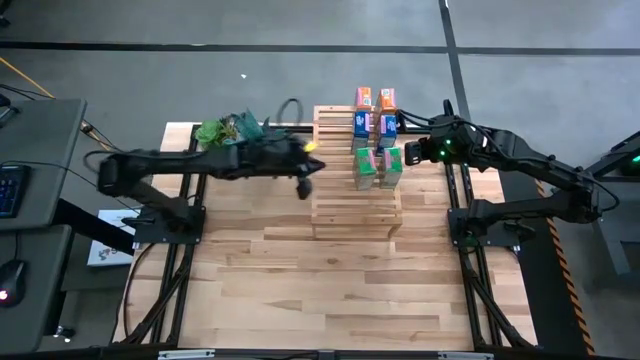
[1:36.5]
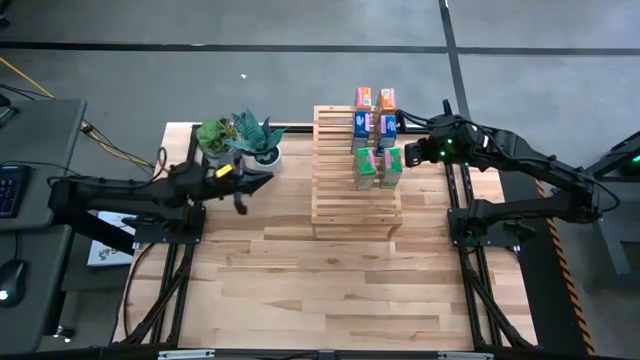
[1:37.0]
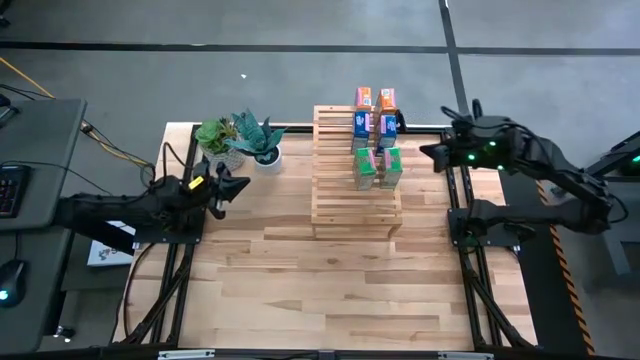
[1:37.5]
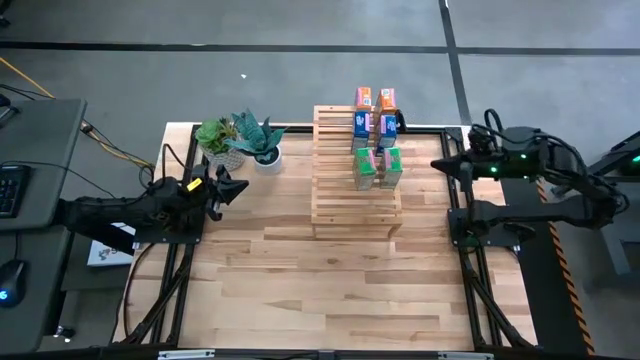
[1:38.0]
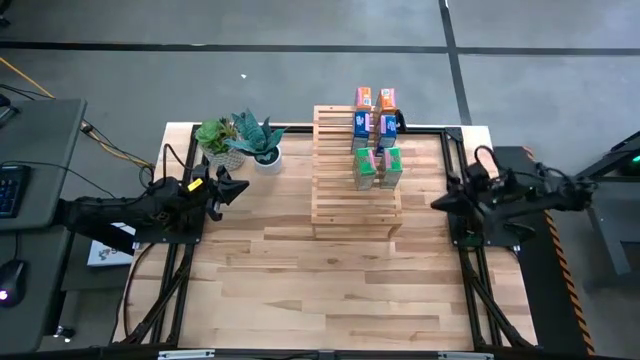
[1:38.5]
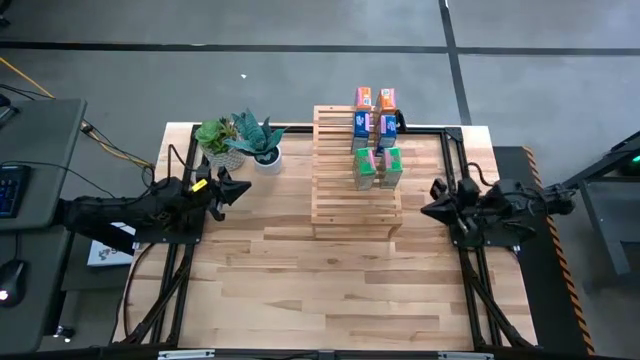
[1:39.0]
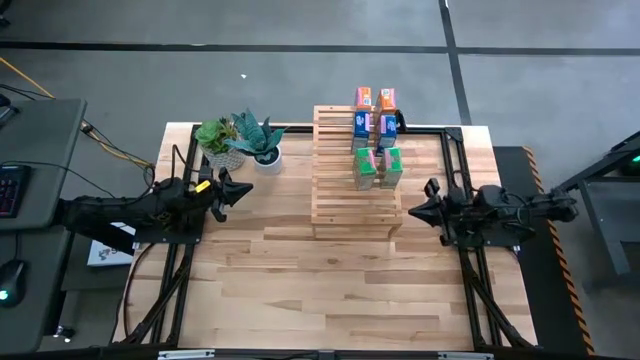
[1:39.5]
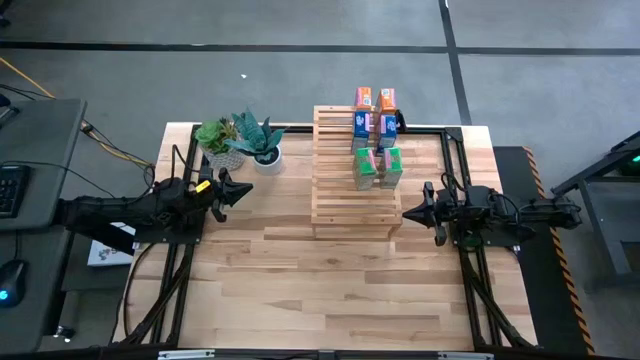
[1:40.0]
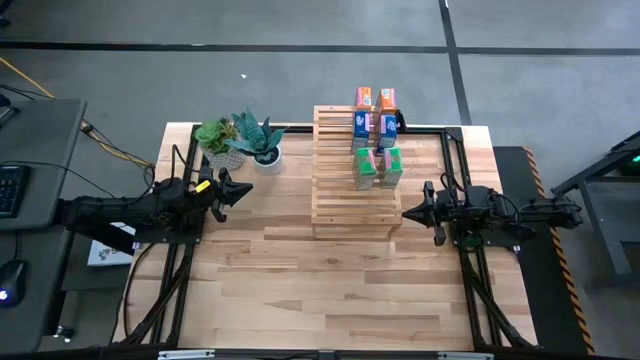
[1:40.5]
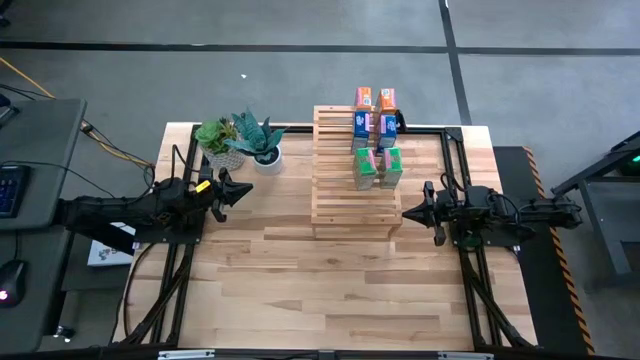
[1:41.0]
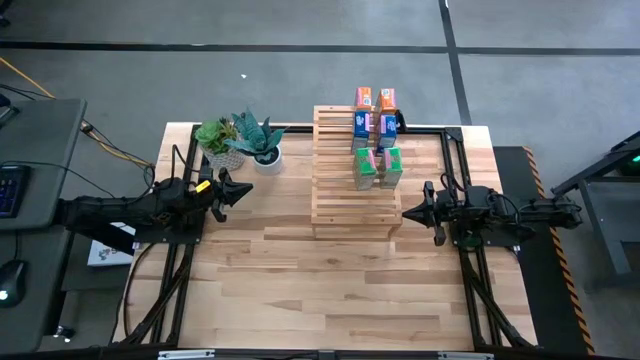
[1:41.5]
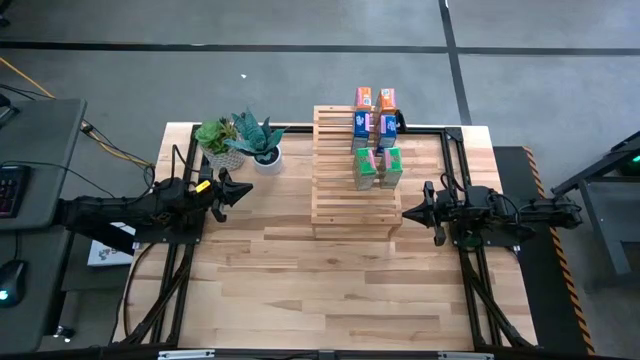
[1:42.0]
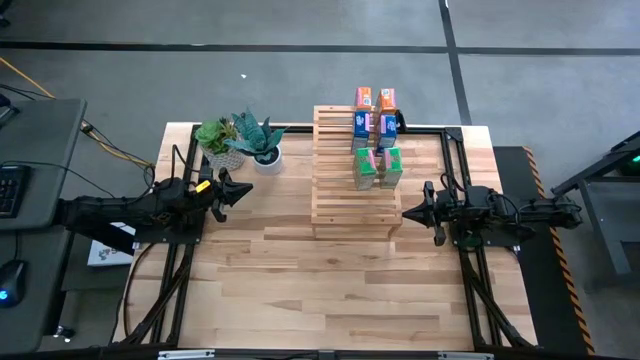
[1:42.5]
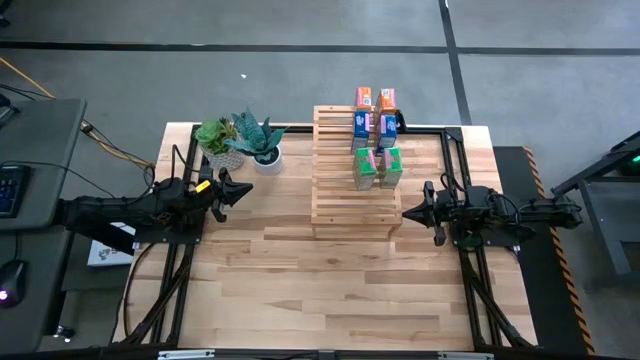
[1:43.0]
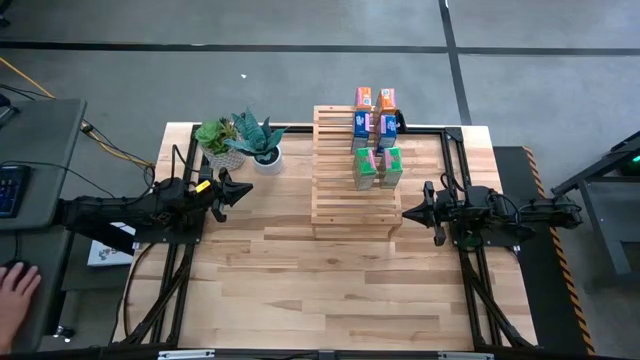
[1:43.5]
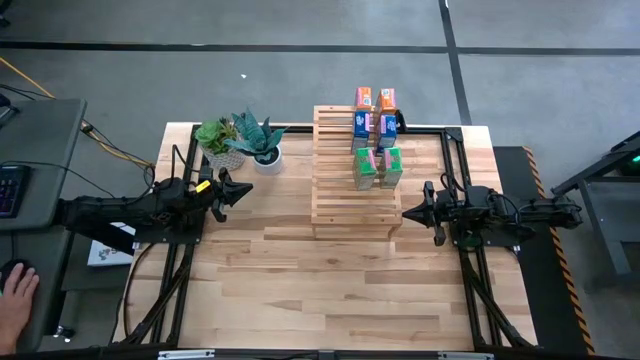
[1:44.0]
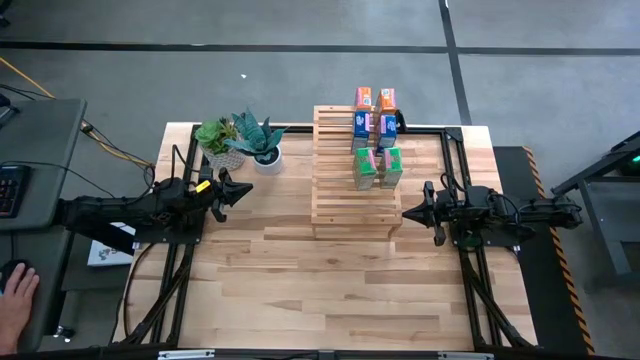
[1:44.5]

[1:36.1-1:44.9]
Task: Stack cereal on shelf
Return to Home Position

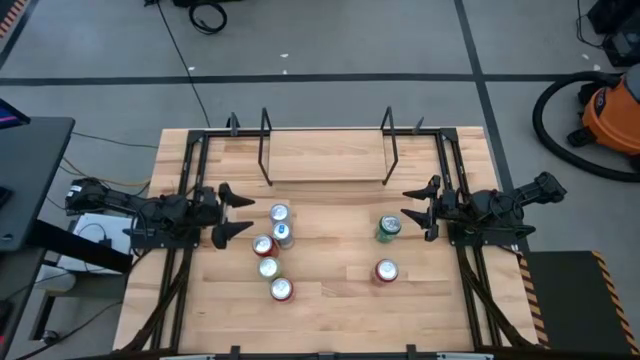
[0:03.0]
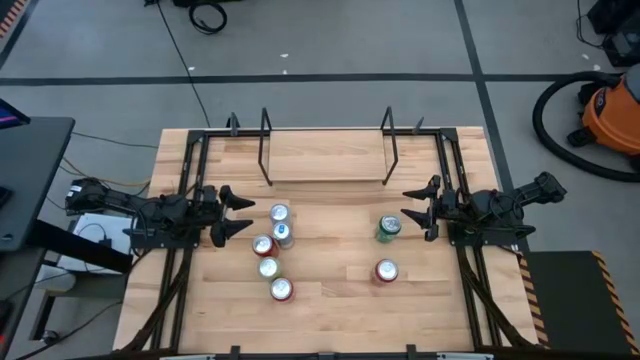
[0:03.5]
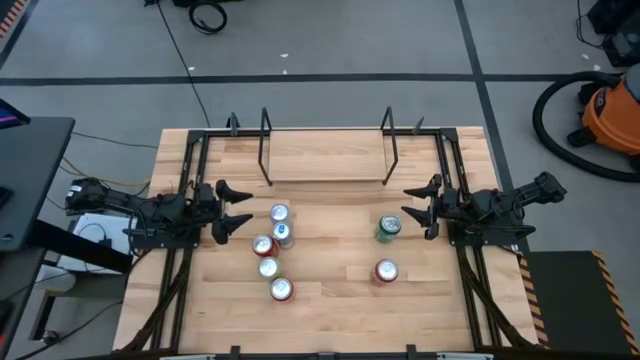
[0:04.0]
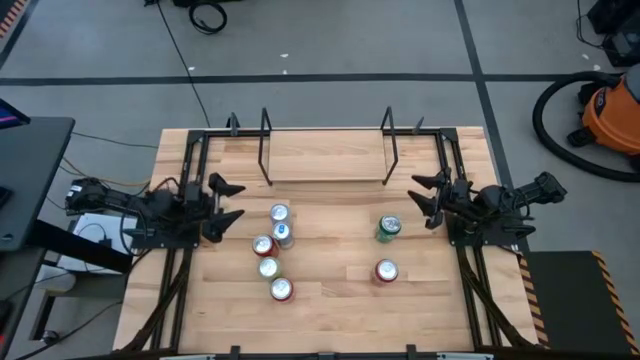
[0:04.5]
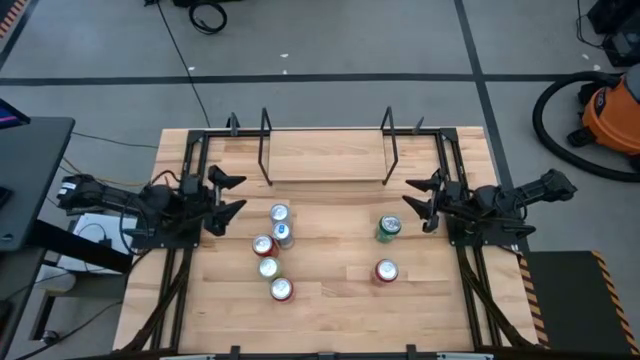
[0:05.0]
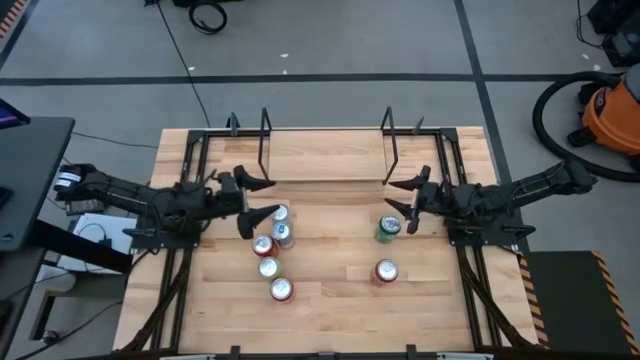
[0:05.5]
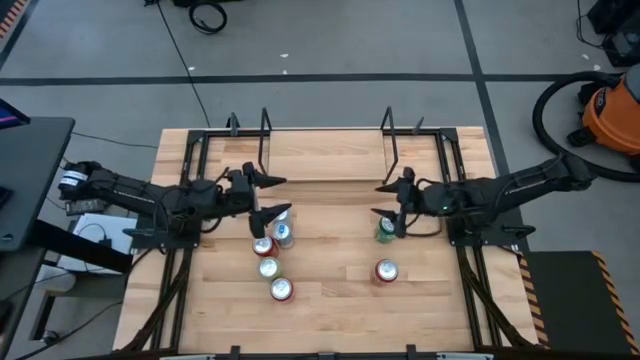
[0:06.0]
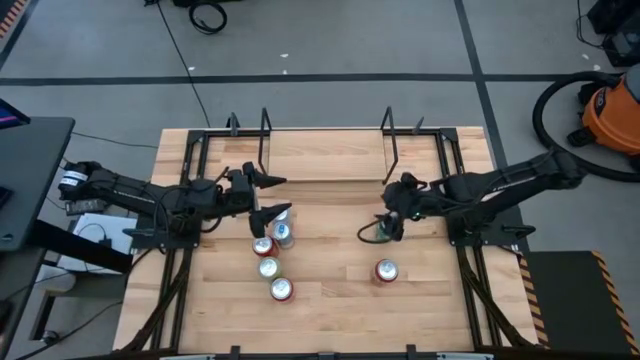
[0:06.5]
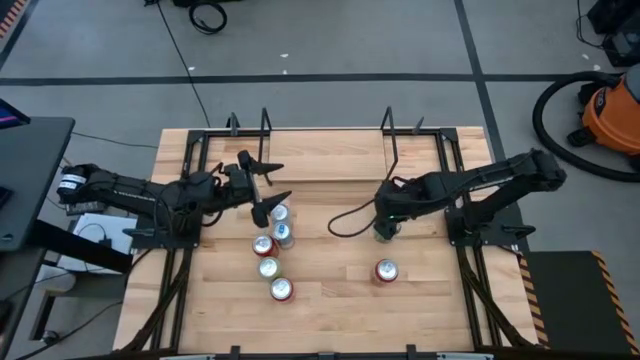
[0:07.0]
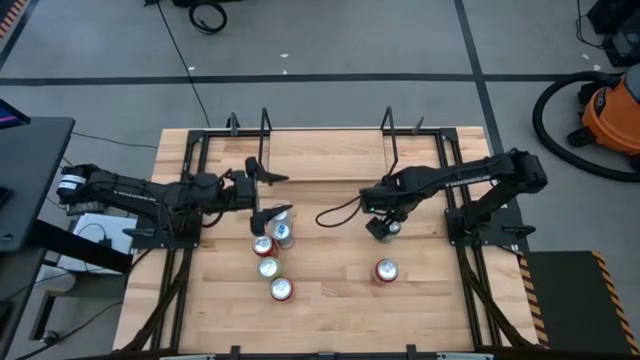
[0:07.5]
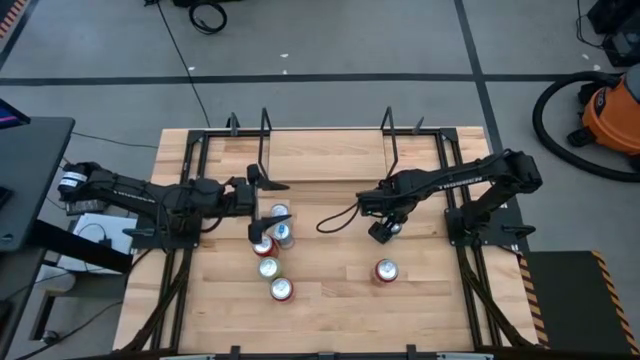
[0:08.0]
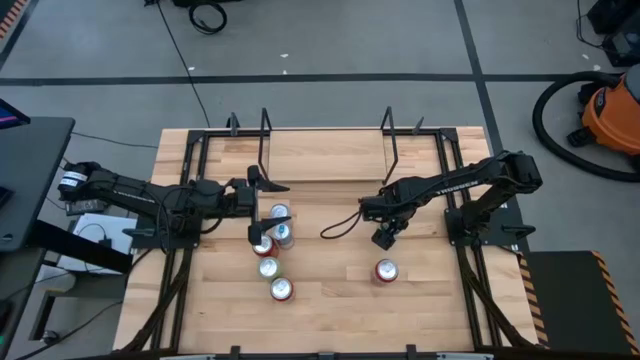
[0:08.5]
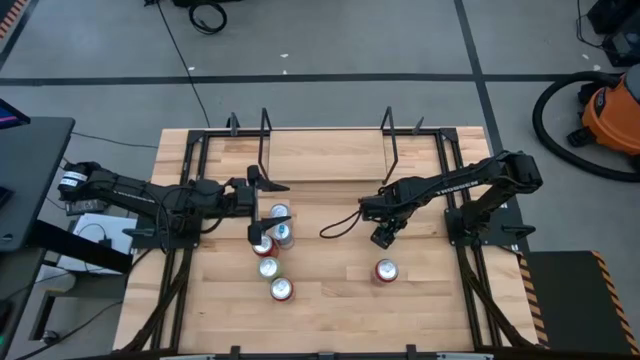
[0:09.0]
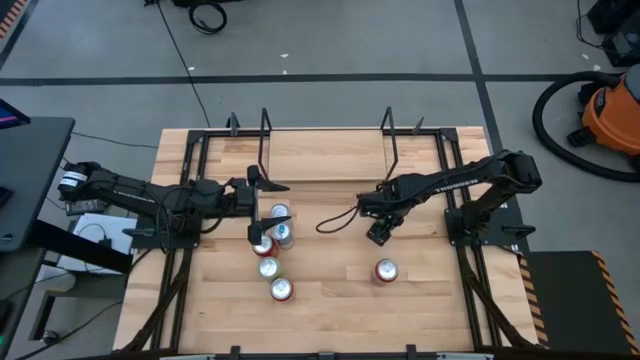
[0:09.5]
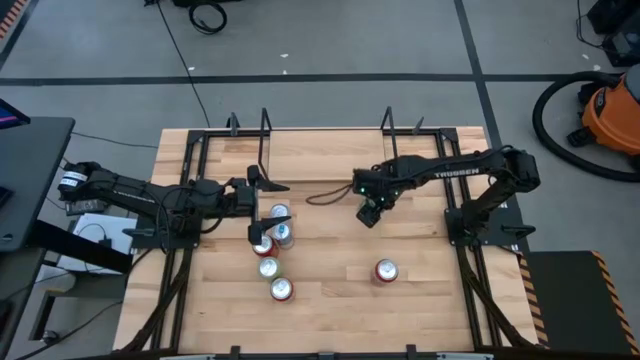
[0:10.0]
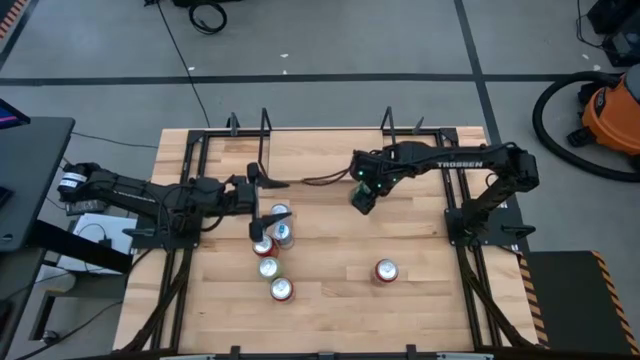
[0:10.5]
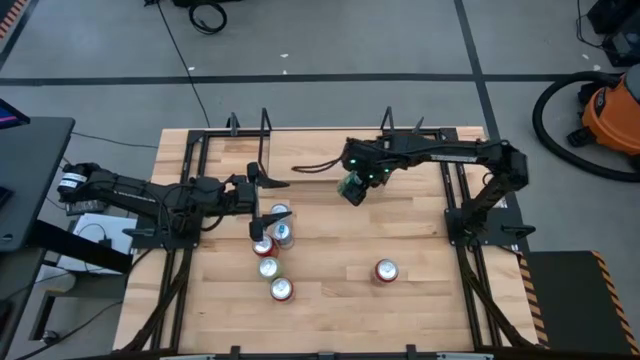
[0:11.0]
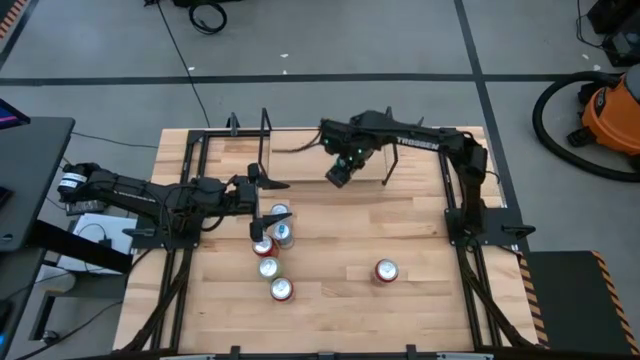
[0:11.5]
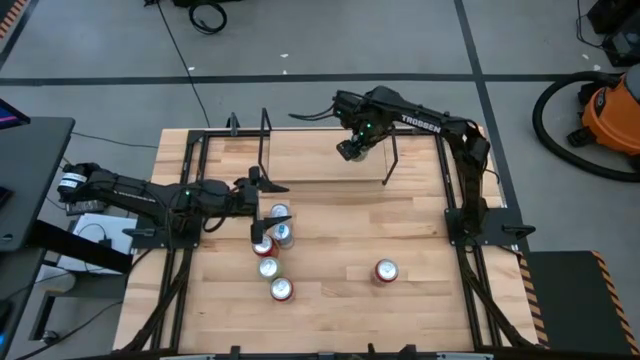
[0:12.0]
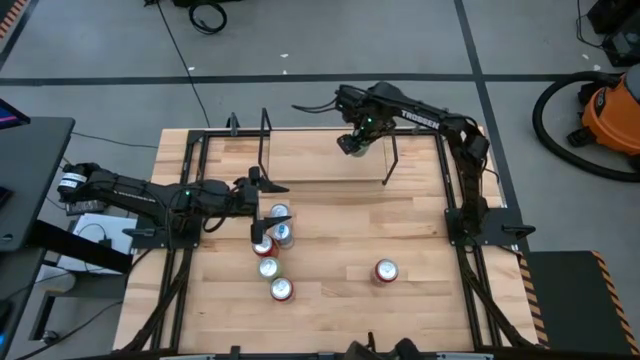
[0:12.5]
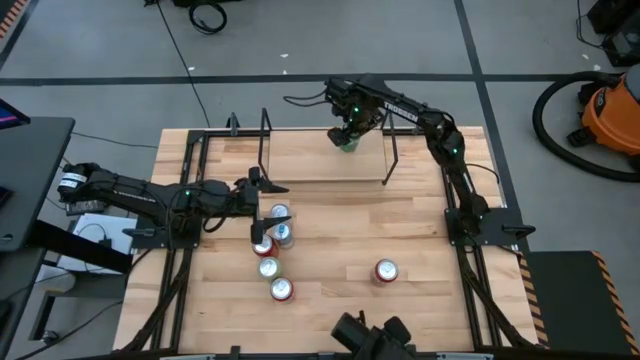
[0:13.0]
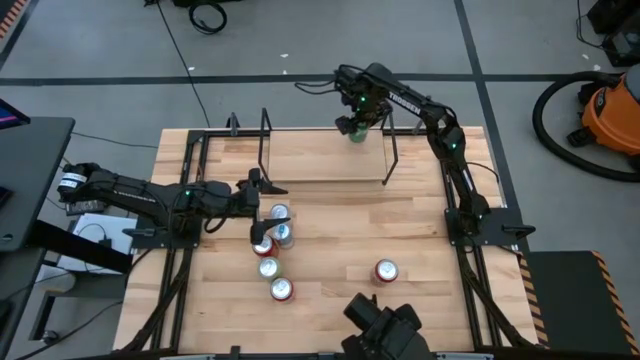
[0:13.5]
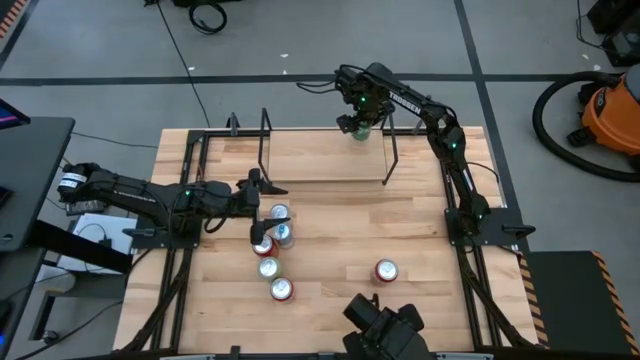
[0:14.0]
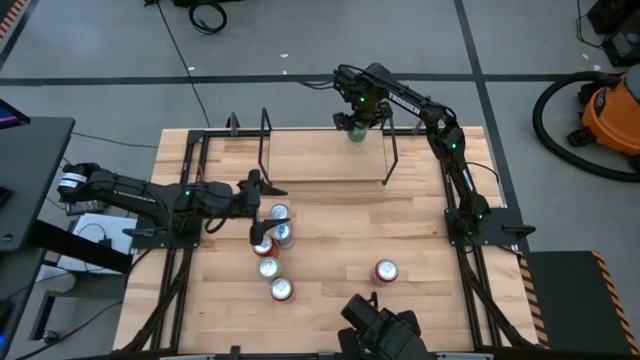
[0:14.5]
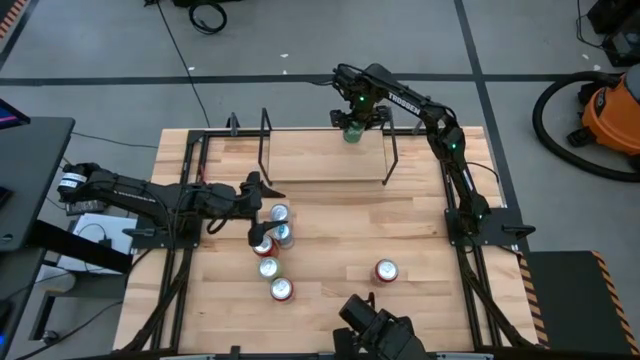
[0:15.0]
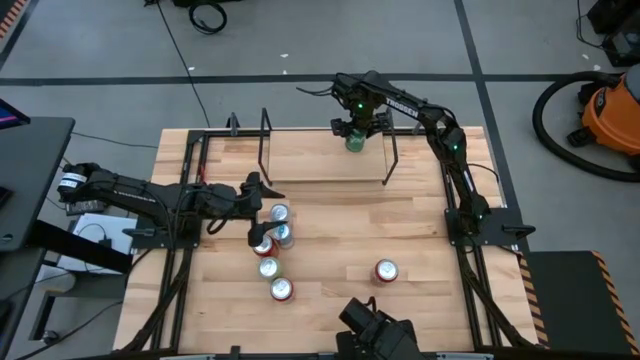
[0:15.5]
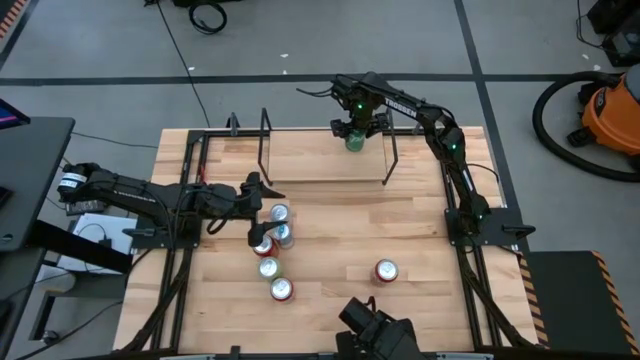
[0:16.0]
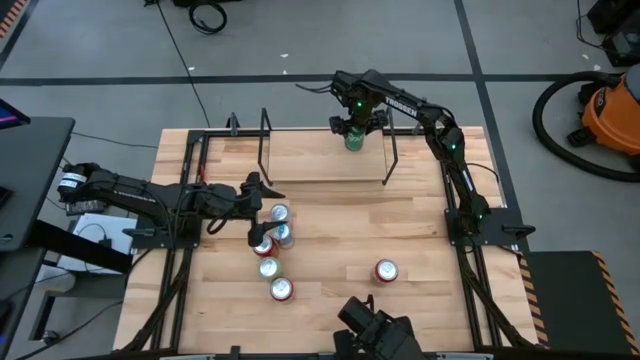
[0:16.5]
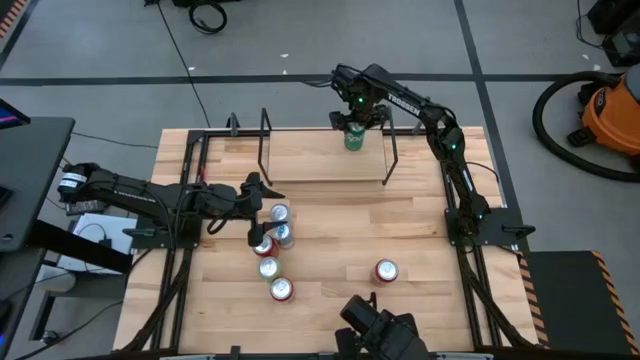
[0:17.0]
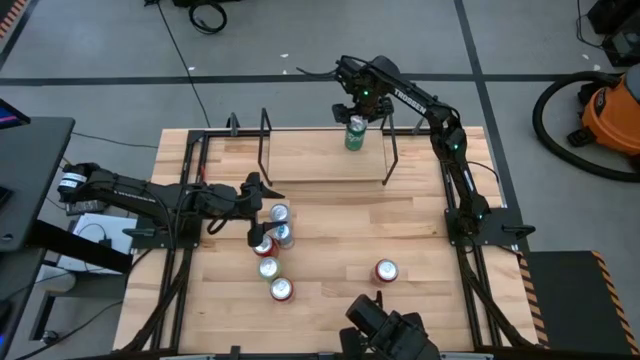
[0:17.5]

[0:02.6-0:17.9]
Task: Place canned beverage on shelf
Put the green soda can on the shelf
